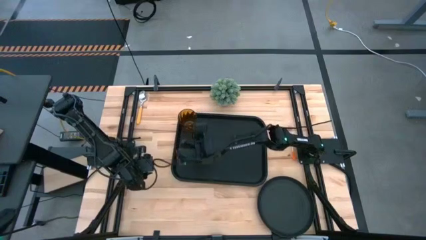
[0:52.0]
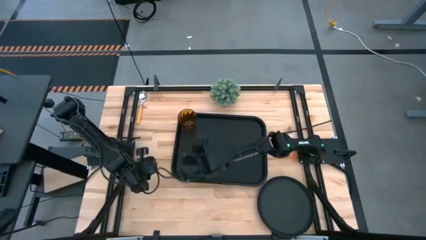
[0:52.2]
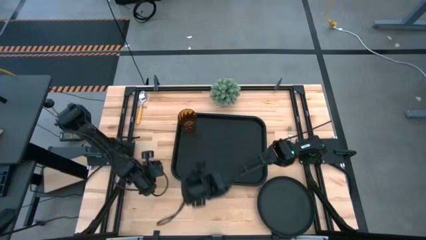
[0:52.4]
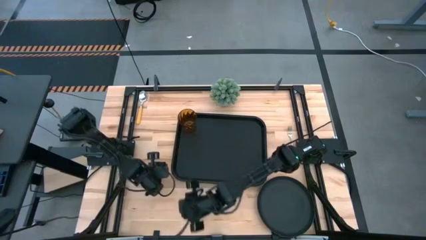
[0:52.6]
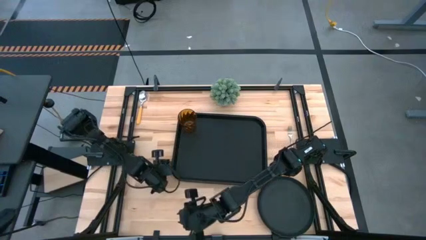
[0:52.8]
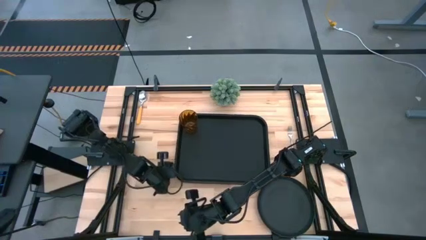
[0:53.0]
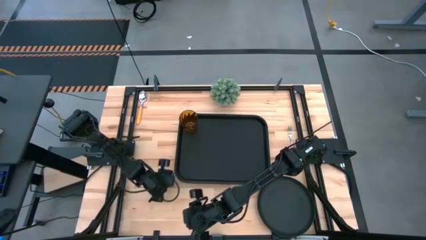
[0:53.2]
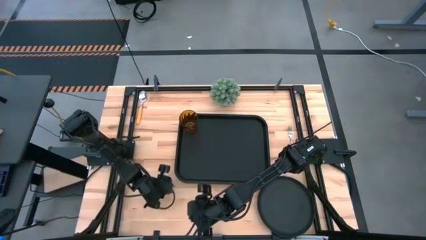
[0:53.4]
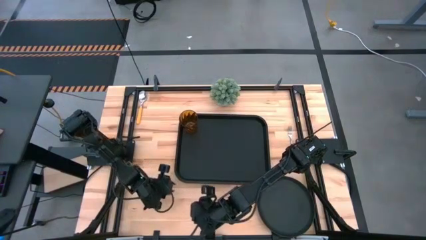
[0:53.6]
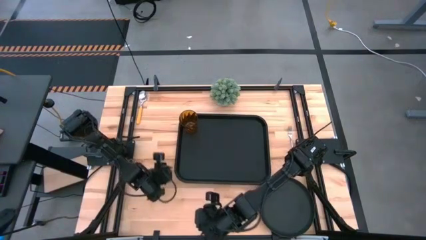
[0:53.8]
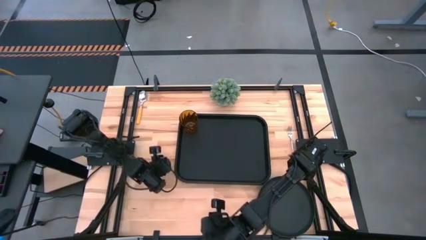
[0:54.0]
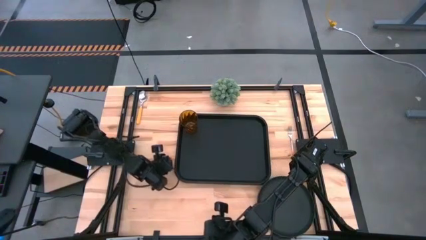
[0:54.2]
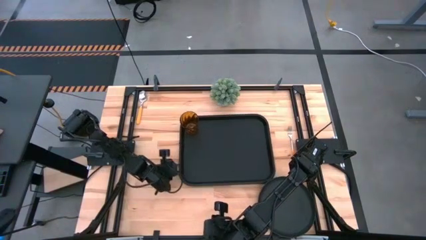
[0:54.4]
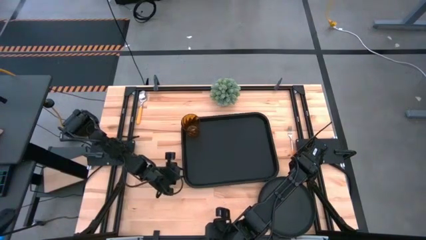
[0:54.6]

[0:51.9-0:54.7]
Task: Pick and place plate/cup/fork/spoon on tray
Adjust the black serving tray

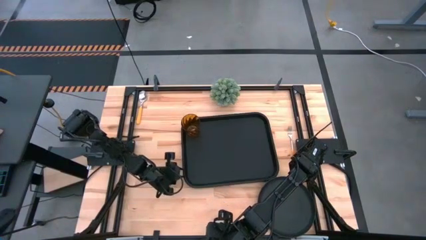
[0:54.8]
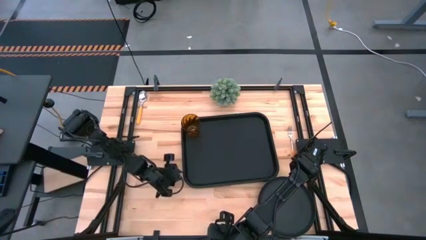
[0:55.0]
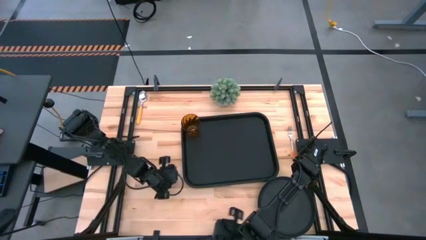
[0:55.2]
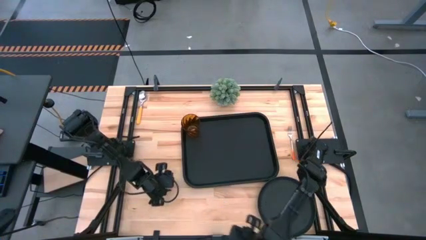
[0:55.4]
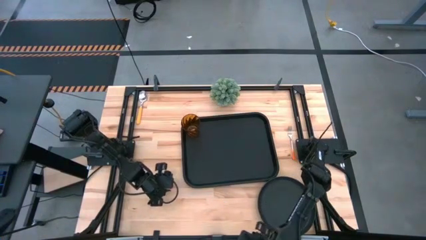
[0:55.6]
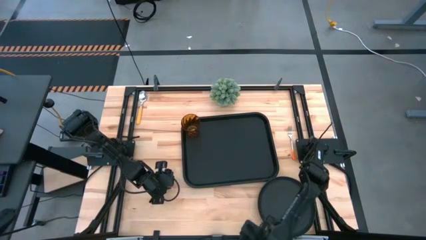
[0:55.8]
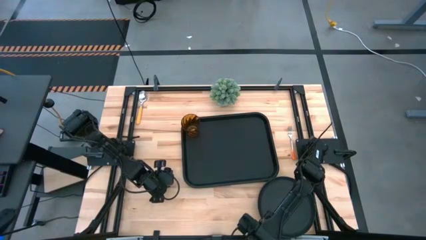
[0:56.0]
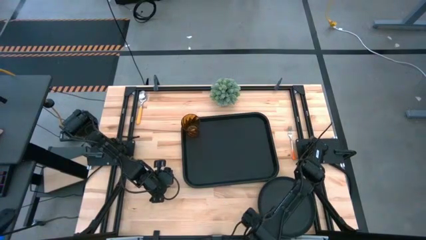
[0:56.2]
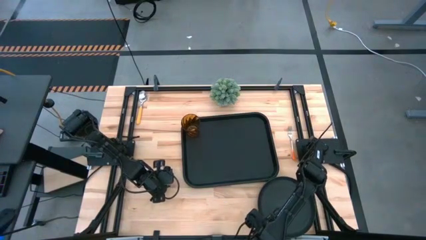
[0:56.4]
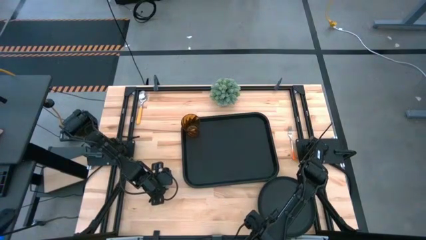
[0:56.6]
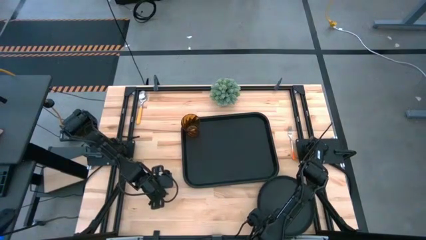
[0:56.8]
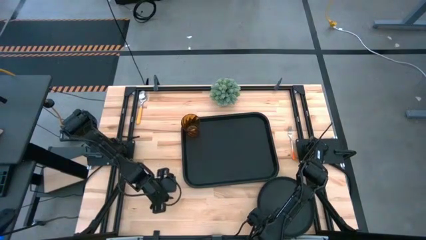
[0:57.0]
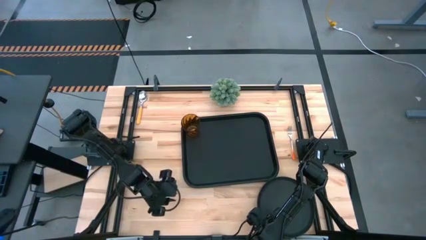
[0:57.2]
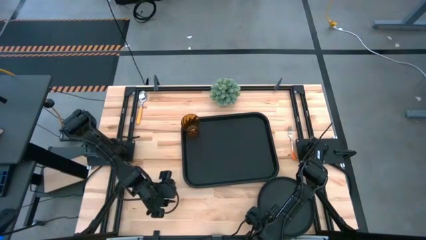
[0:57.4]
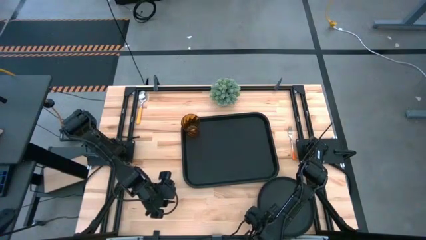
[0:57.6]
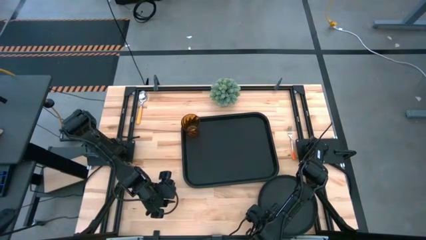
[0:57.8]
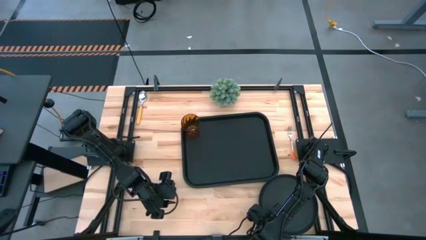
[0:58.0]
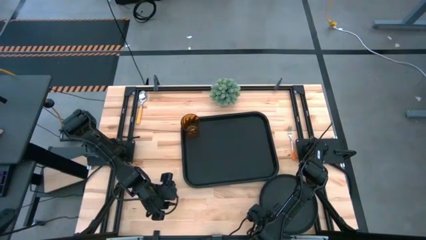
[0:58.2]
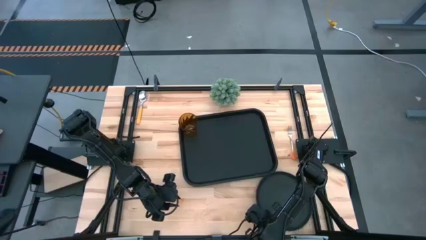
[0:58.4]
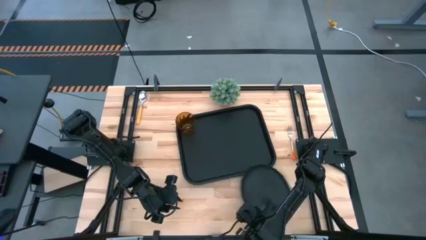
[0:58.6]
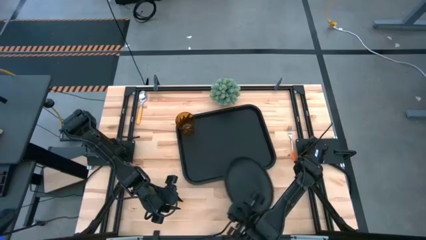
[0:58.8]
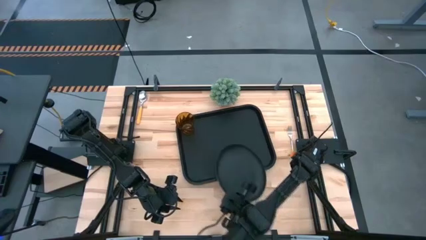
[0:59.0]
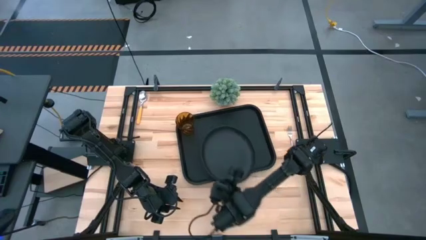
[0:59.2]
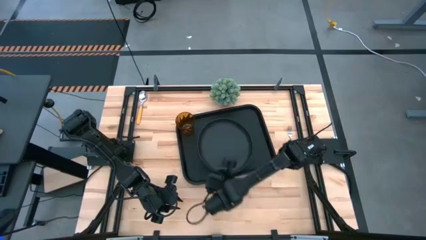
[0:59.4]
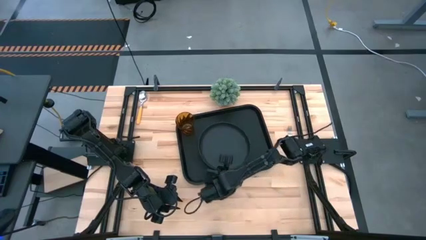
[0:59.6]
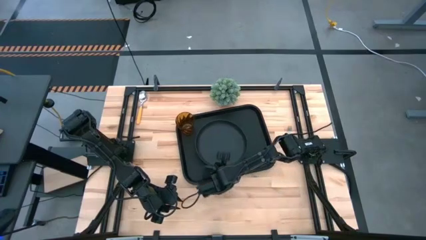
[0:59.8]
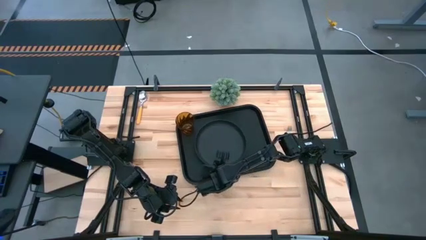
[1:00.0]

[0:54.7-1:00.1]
Put the black plate on the black serving tray to the bottom right of the brown cup

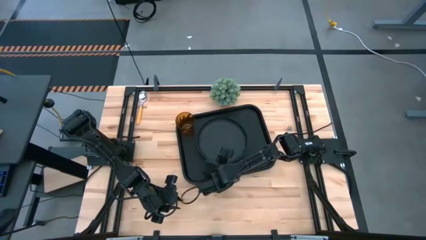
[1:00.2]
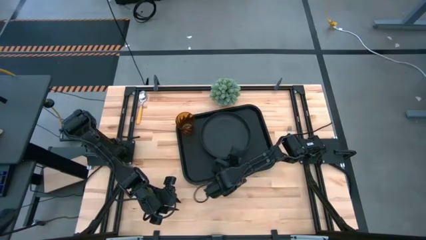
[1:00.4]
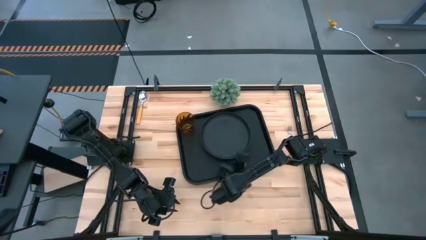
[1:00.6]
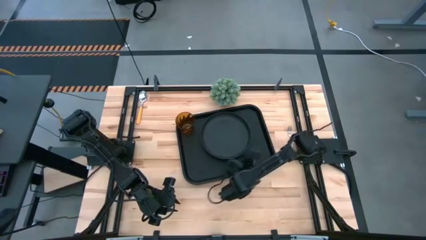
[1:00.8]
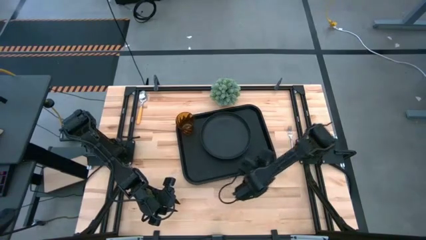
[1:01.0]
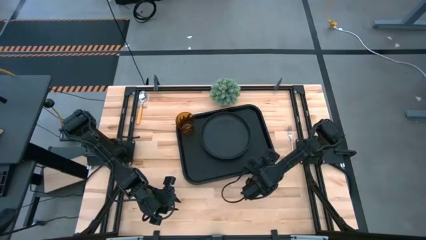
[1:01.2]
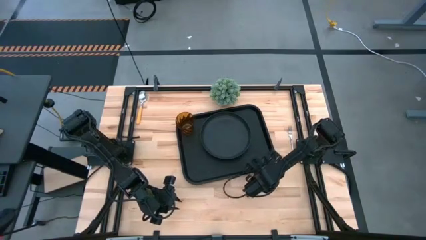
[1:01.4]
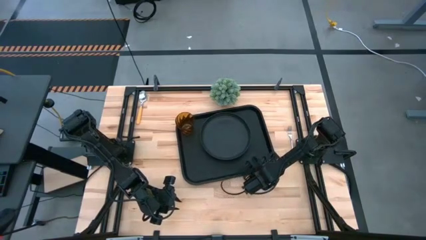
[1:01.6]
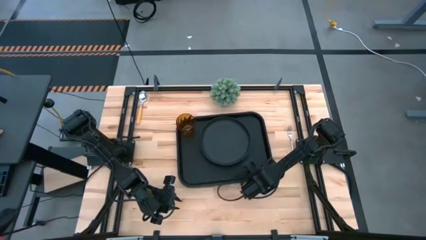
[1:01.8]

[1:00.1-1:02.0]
Adjust the black serving tray

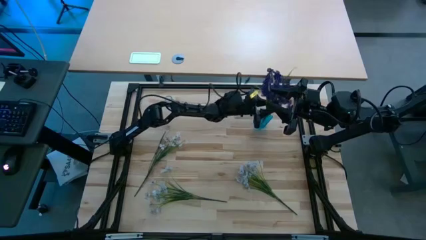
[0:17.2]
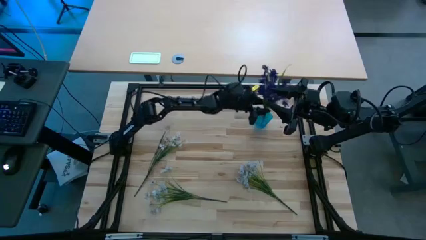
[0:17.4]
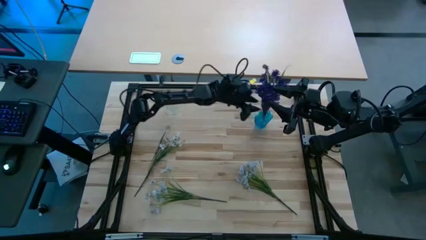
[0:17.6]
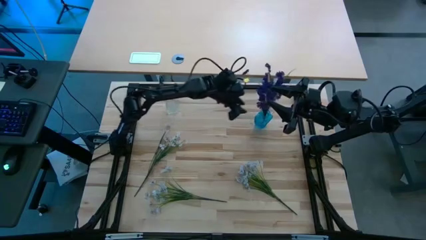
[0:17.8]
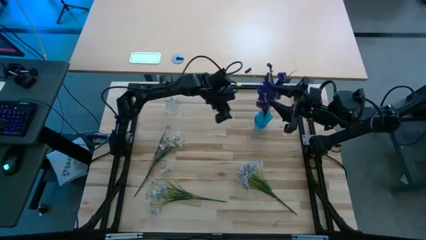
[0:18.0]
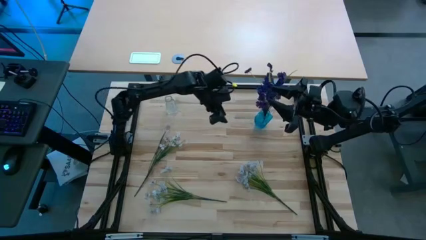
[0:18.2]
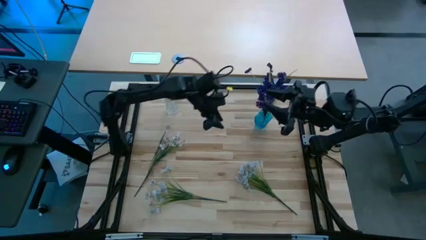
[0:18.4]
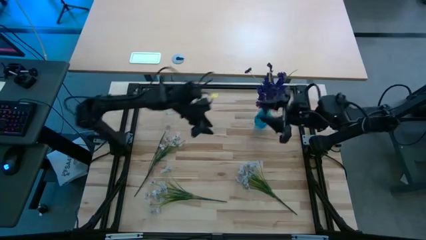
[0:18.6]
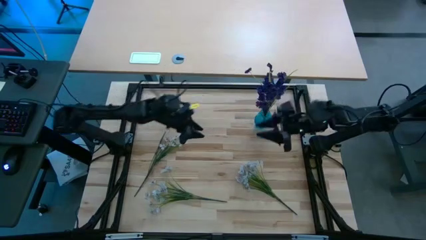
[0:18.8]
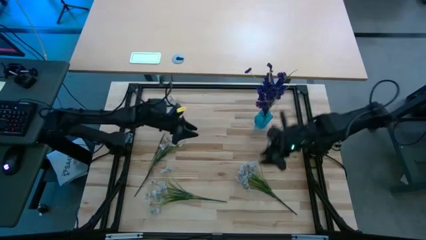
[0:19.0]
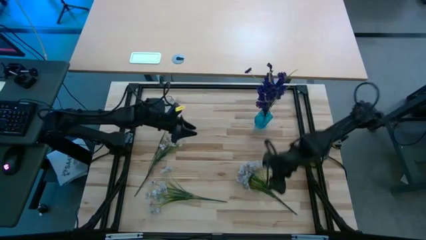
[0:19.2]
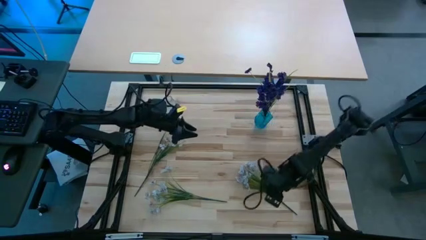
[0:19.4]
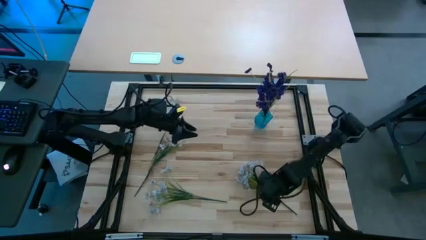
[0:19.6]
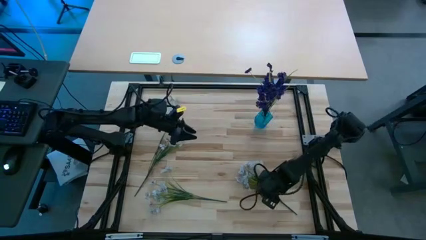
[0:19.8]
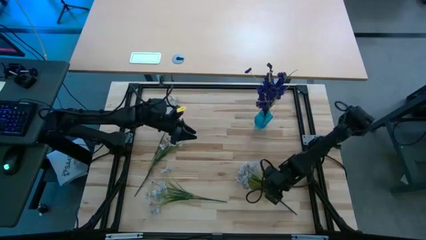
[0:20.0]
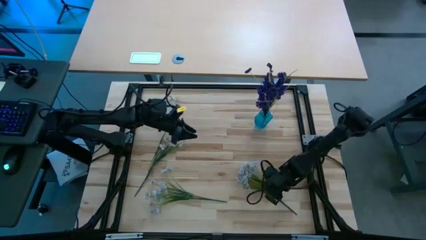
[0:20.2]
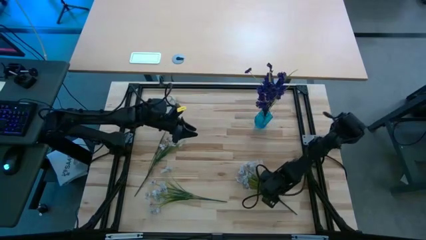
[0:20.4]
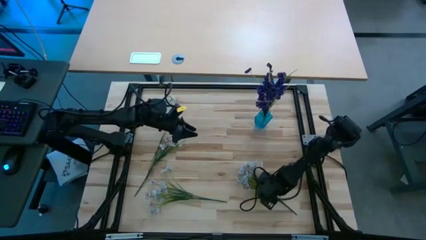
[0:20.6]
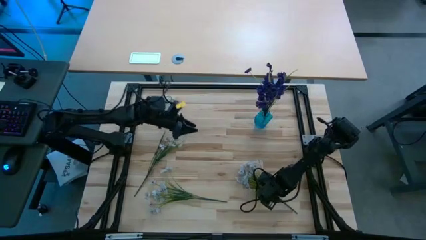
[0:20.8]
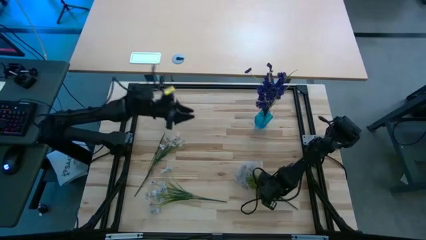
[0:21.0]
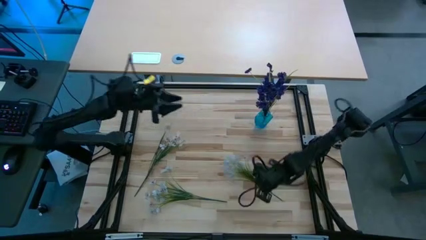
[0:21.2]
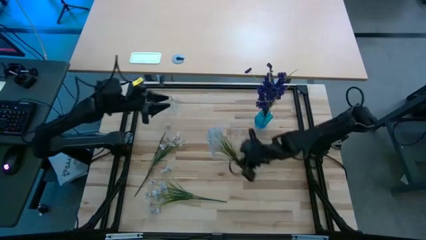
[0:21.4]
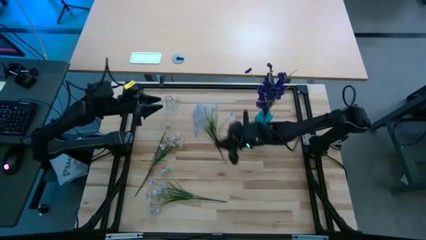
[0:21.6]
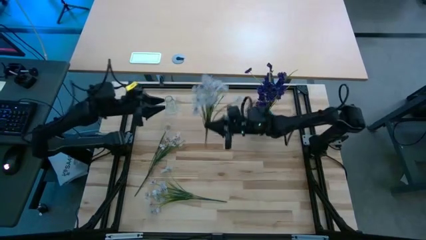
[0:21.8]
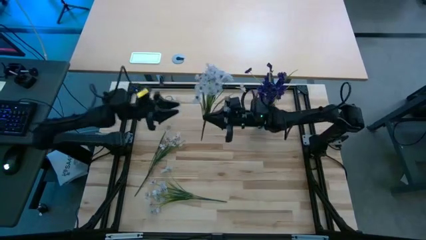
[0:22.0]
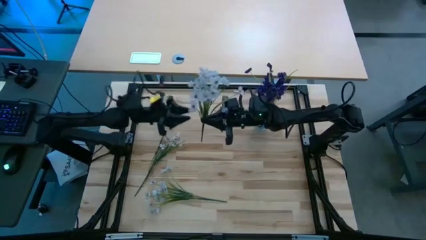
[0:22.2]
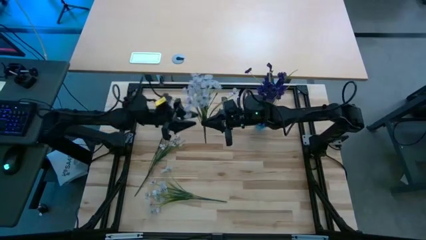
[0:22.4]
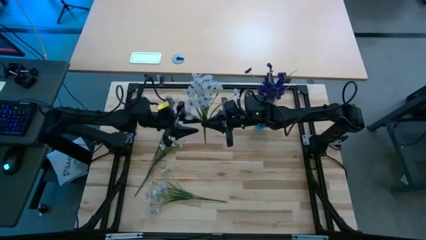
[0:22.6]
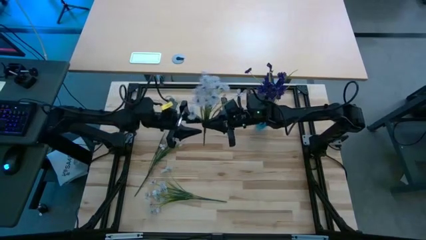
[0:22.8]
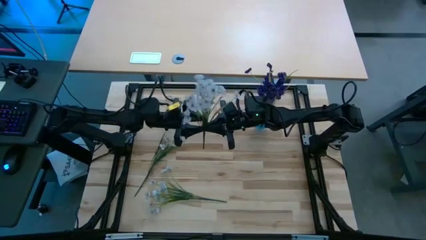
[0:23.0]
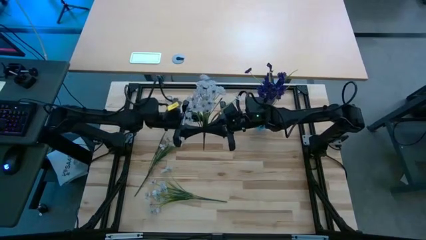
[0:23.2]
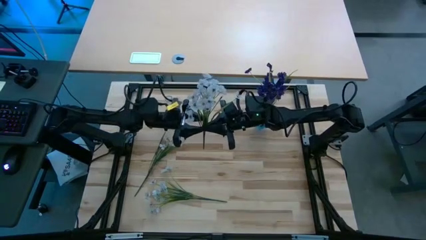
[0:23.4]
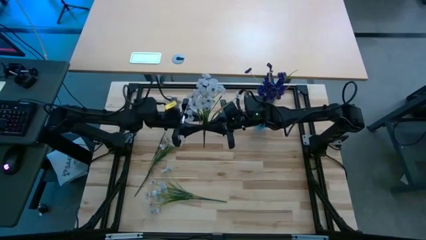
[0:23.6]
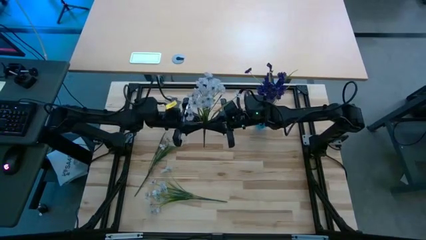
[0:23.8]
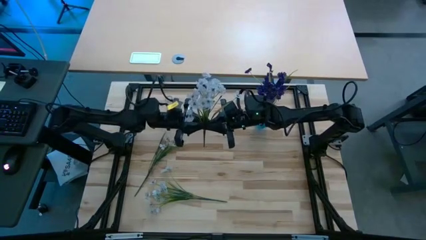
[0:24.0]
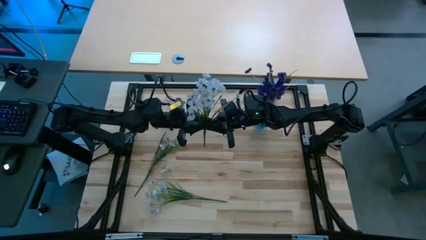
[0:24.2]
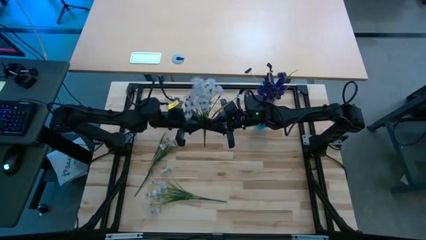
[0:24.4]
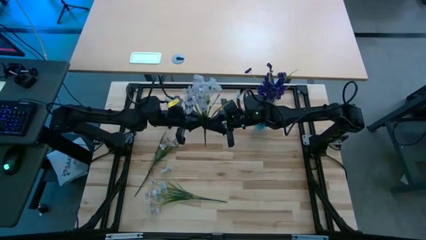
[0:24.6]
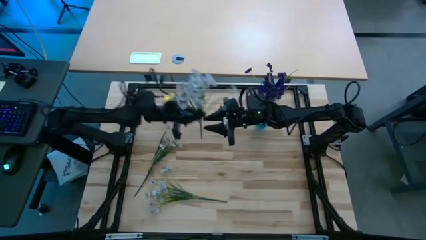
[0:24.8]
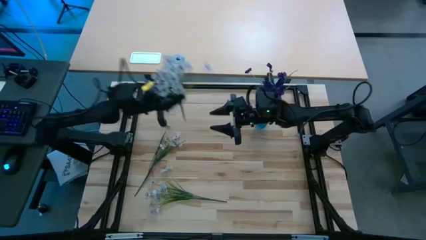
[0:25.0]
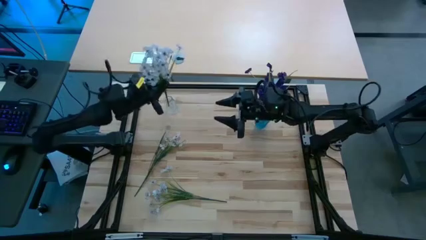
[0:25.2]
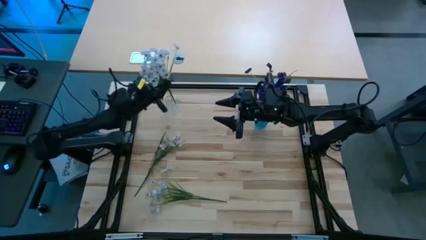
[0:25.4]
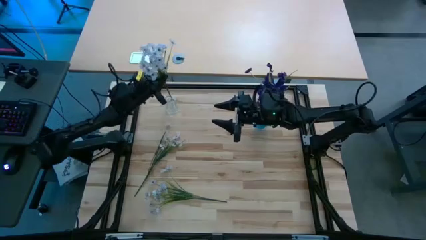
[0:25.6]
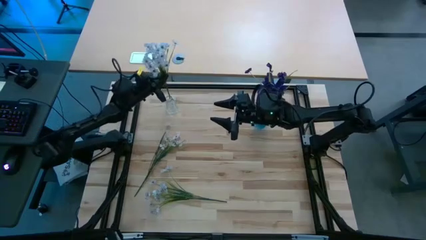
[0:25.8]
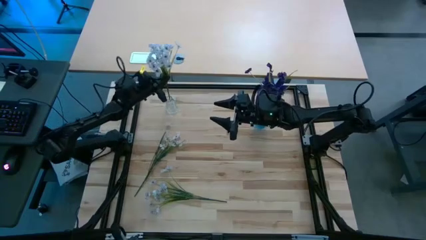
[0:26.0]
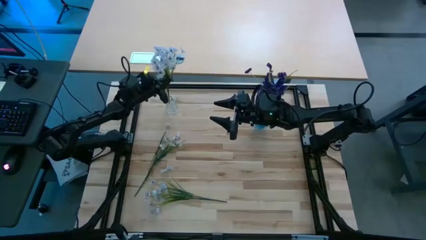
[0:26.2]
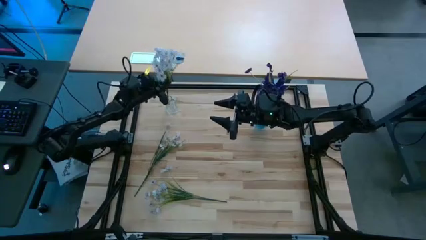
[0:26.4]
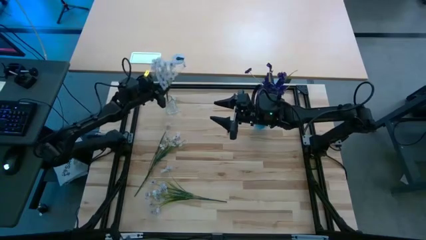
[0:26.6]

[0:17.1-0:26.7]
Task: Sort flowers into vase by color
Put the bottom right white flowers into the transparent flower vase
